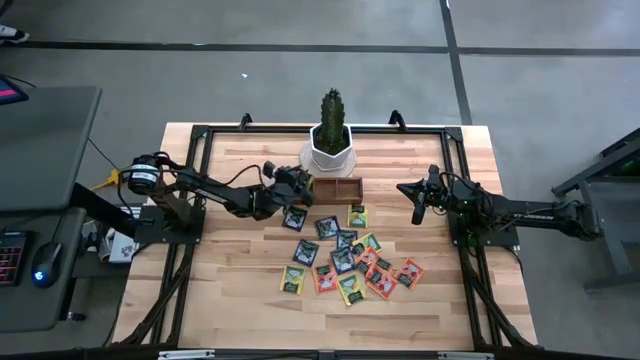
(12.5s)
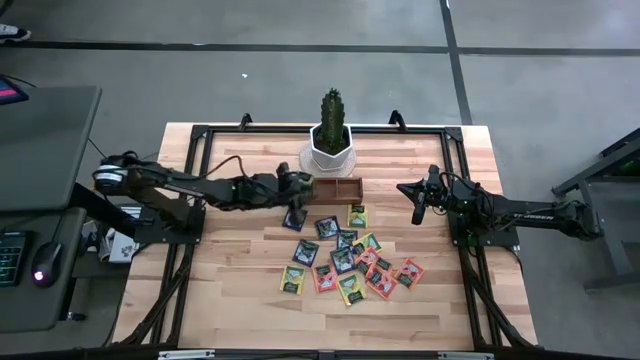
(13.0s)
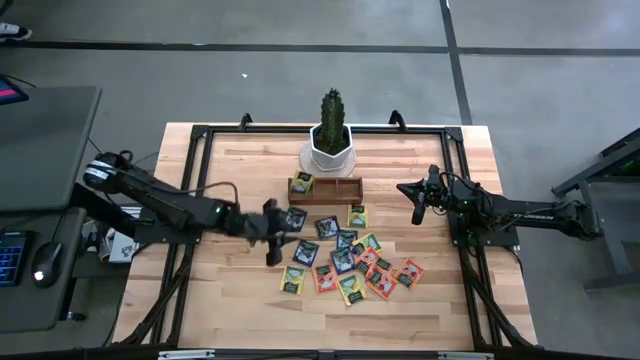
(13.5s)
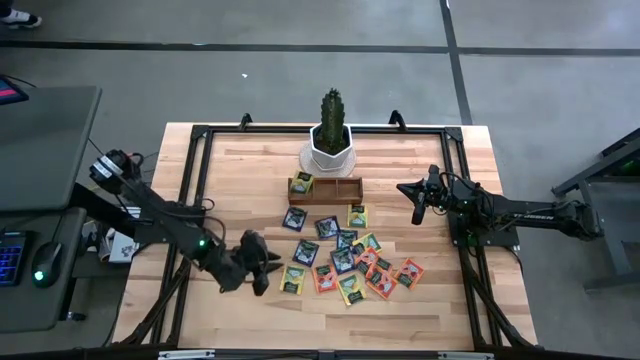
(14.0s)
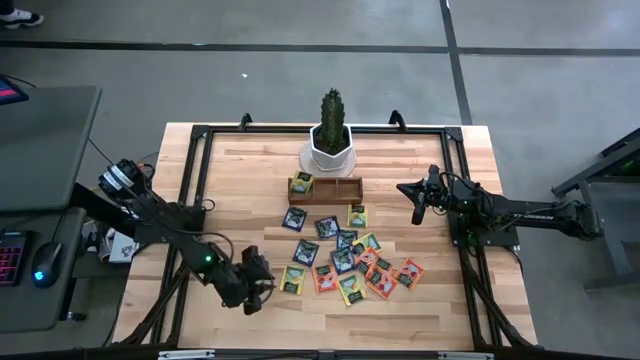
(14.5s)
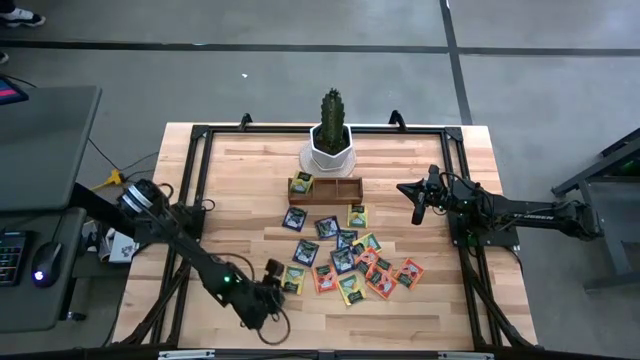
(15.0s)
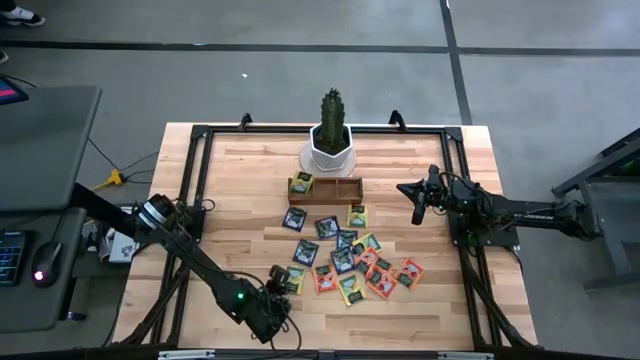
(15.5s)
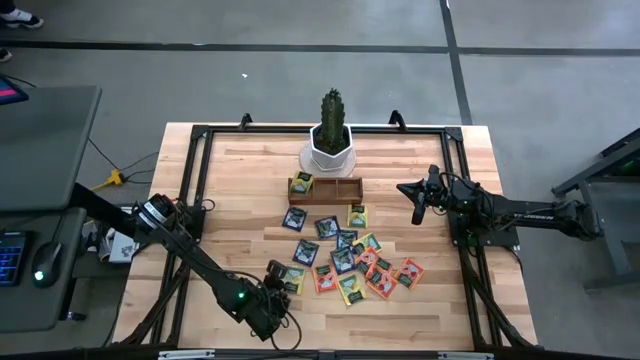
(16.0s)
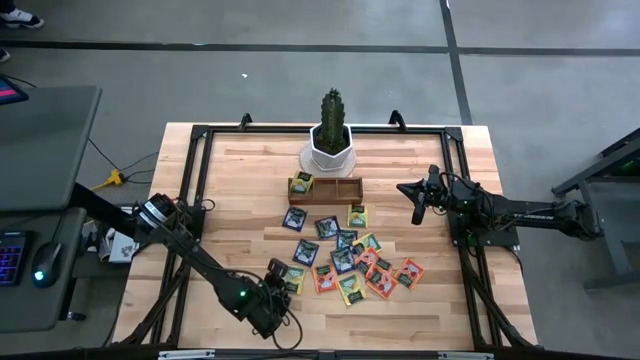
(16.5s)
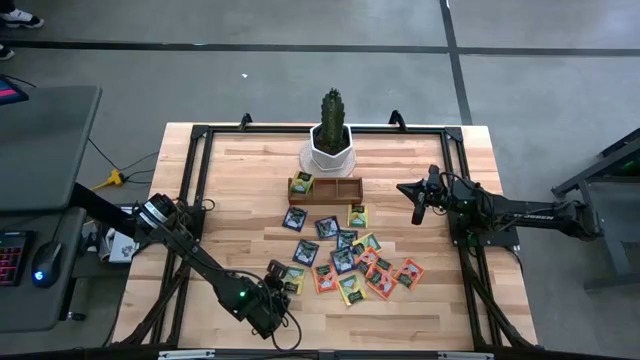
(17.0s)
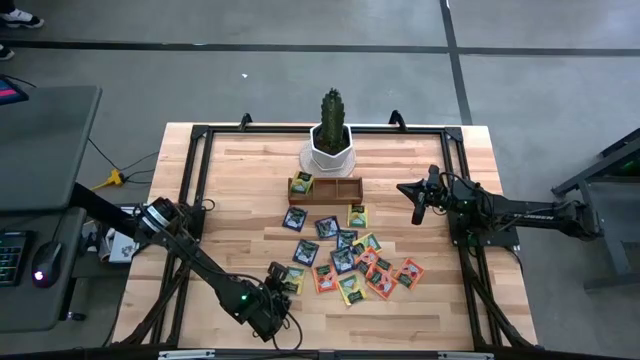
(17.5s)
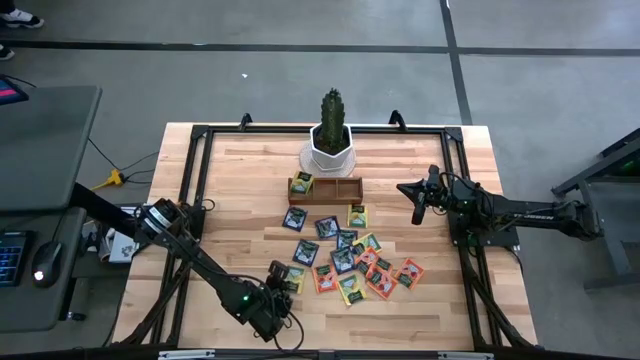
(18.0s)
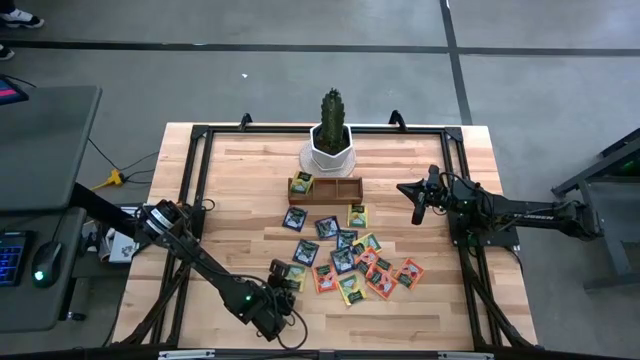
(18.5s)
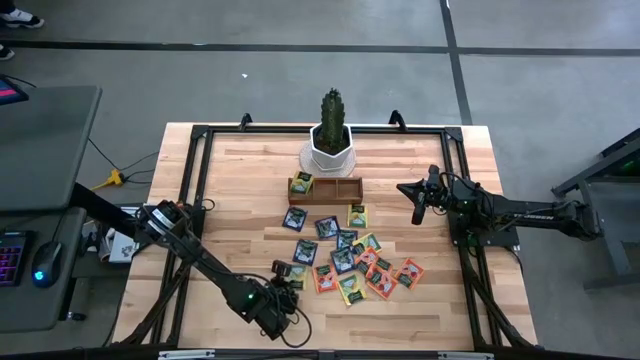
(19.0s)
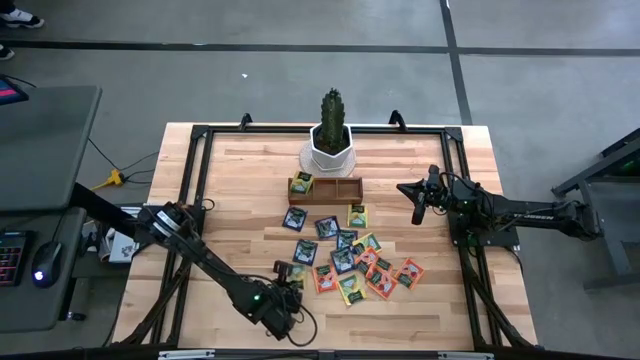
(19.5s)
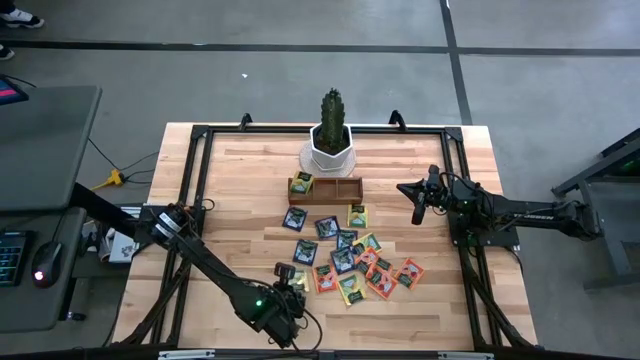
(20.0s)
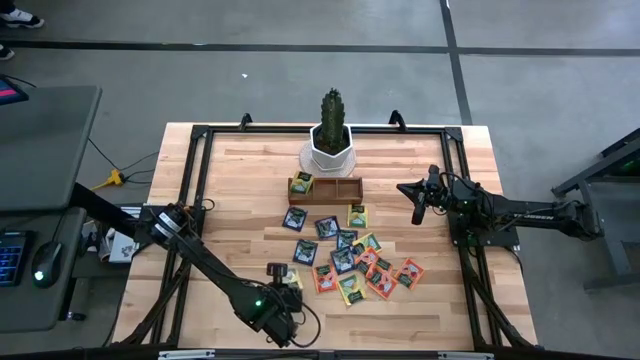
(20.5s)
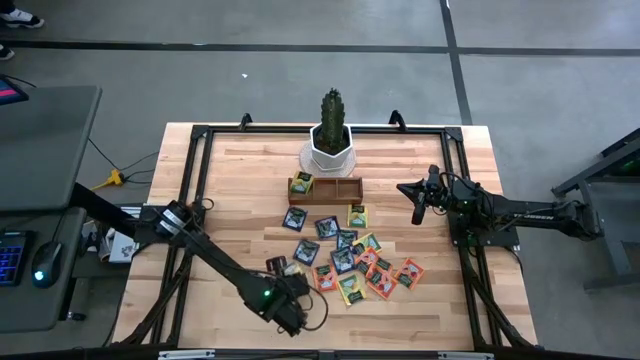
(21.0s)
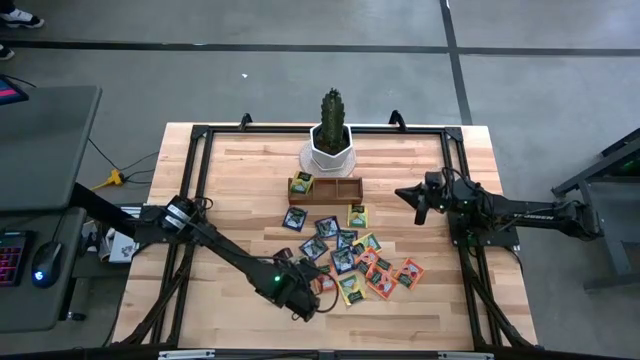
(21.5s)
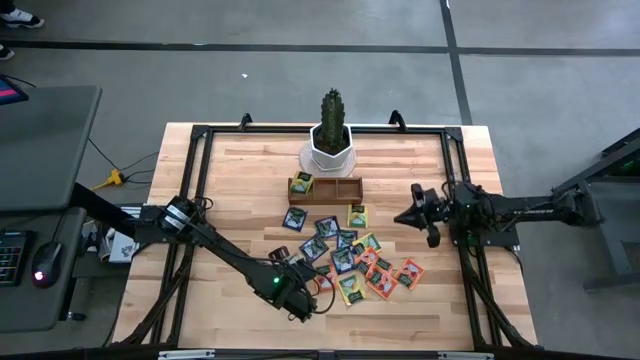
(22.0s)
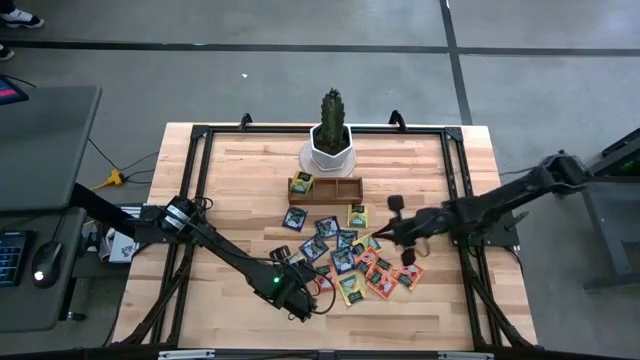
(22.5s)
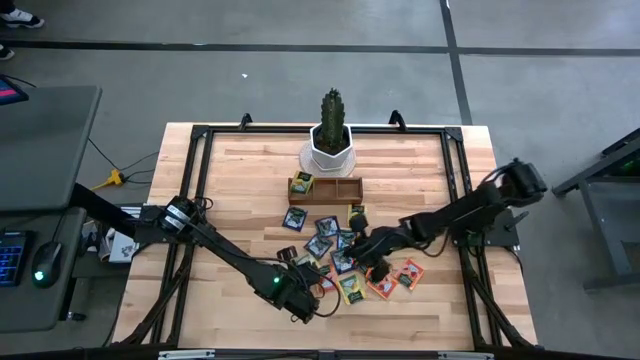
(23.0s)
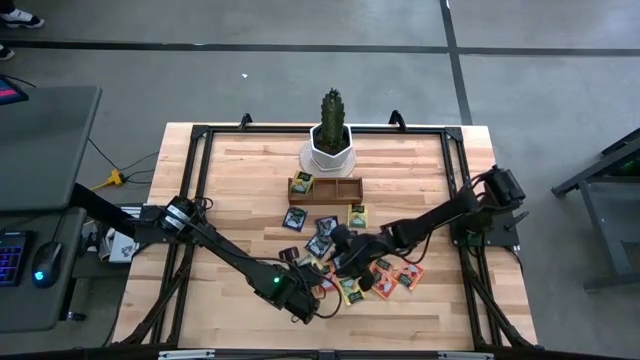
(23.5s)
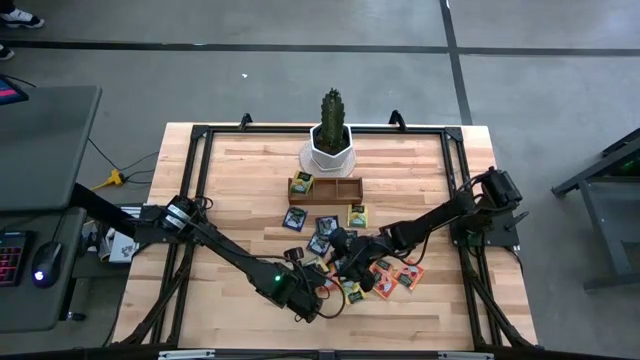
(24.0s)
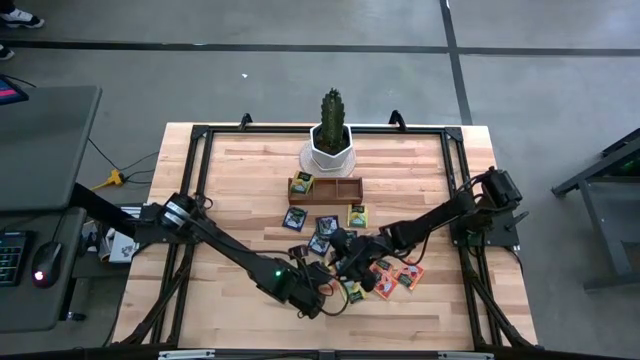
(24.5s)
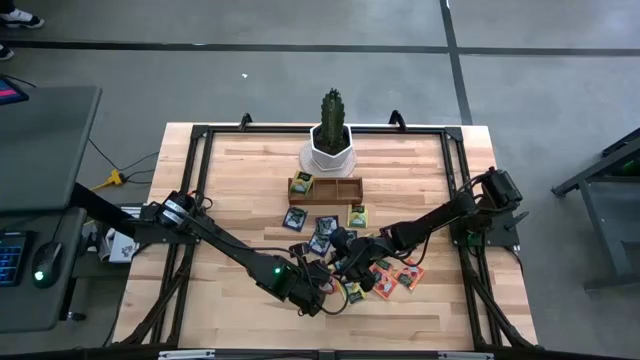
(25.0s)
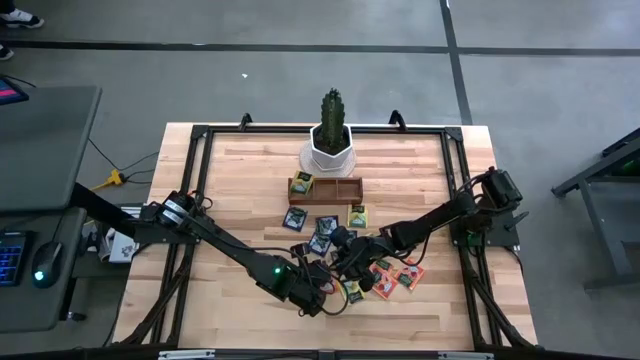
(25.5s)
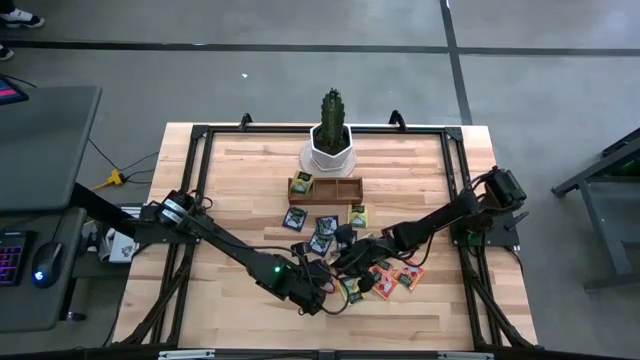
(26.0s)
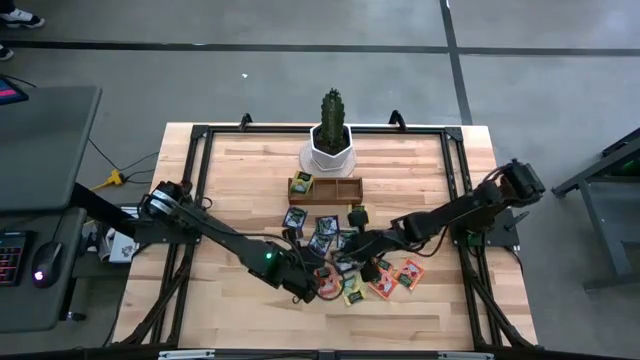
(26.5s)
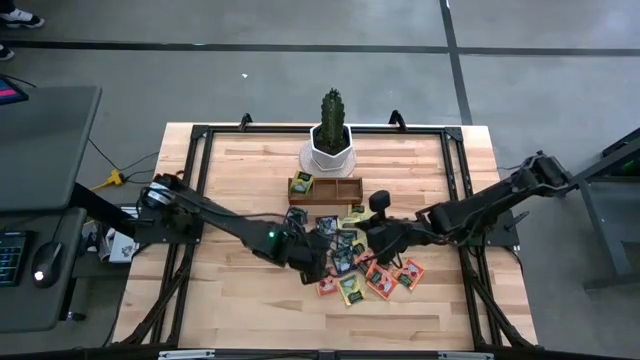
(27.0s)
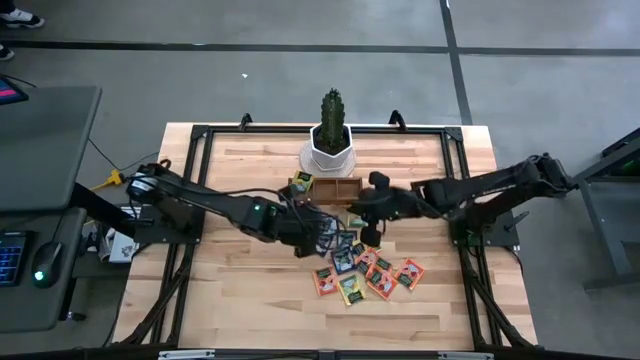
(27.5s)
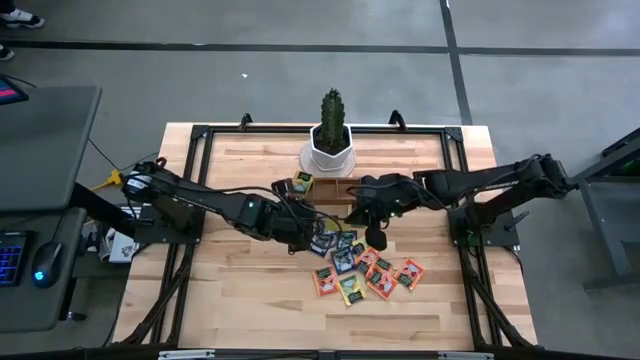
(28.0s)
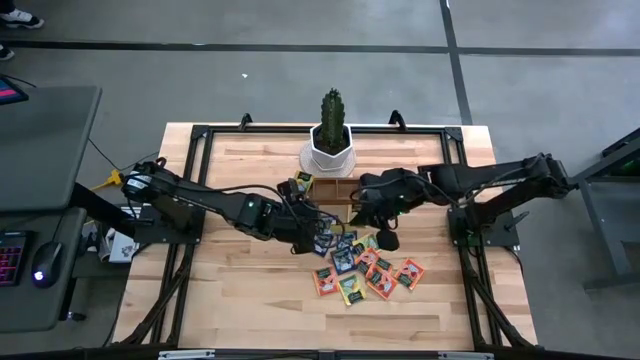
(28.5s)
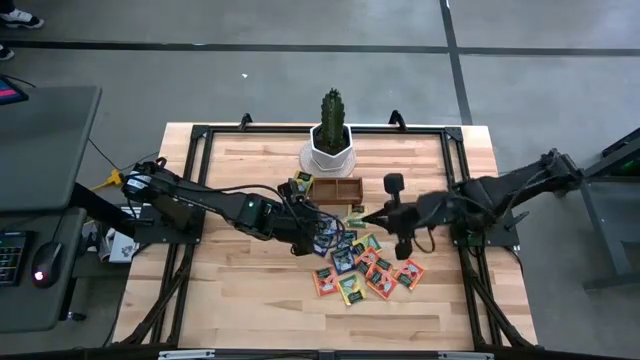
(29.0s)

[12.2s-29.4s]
Task: Pick & Place Tea
Put the yellow tea bag into the left section of the wooden organizer

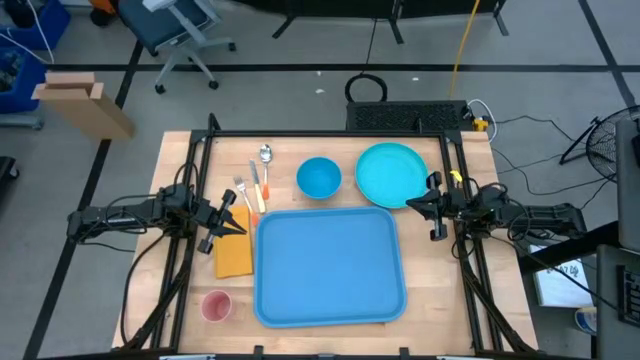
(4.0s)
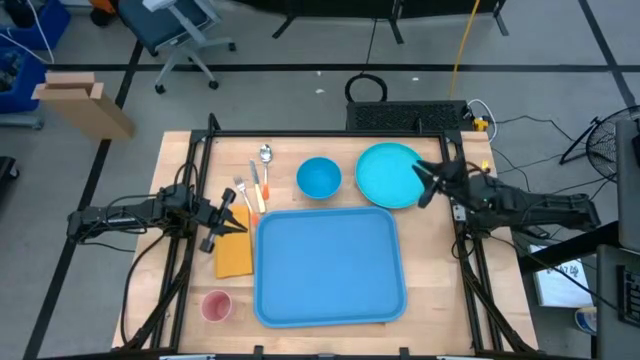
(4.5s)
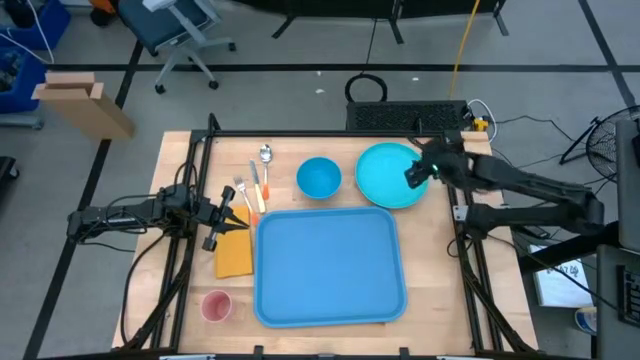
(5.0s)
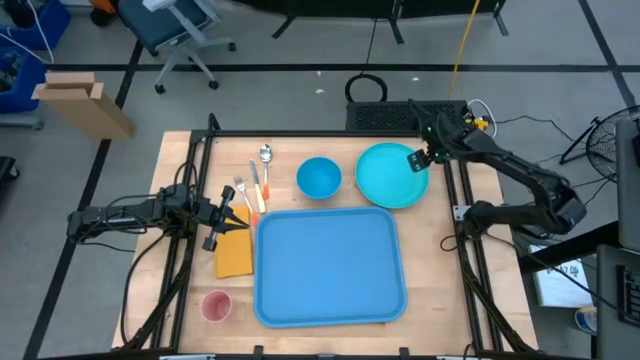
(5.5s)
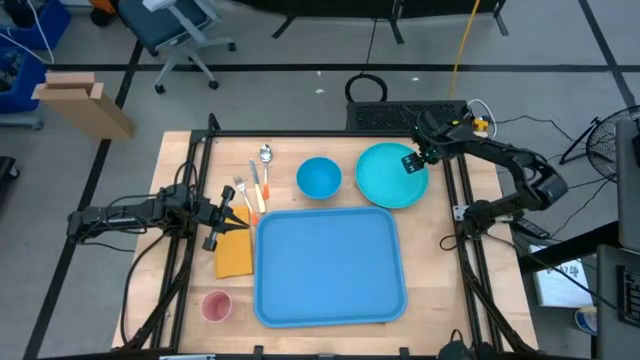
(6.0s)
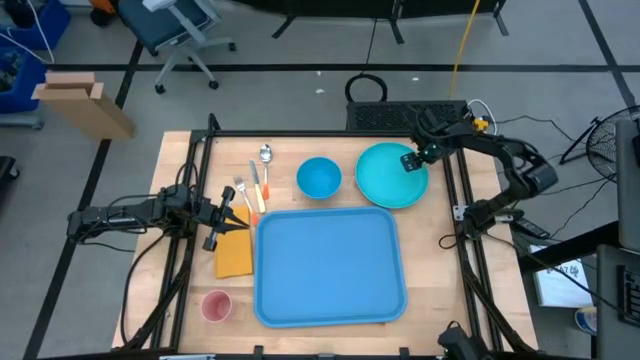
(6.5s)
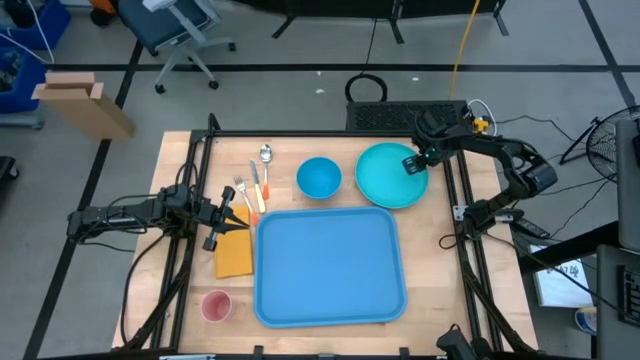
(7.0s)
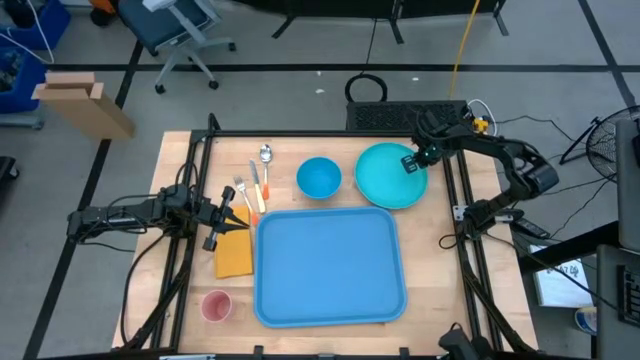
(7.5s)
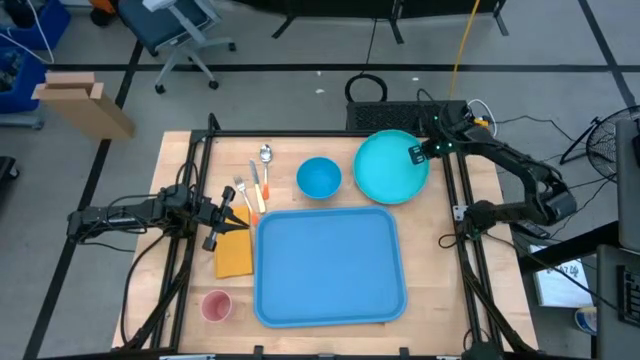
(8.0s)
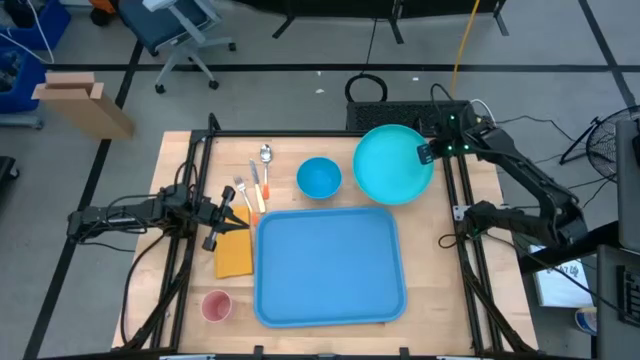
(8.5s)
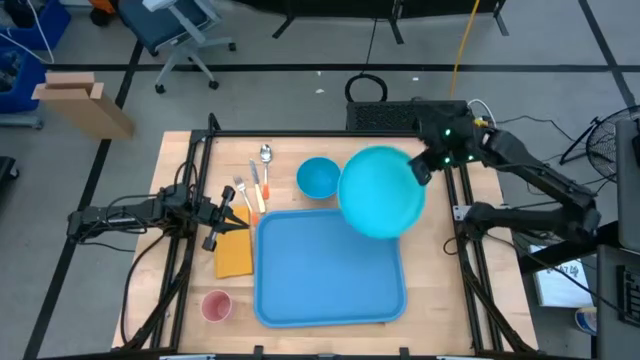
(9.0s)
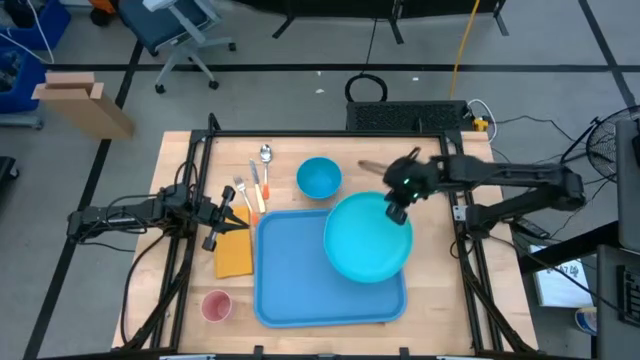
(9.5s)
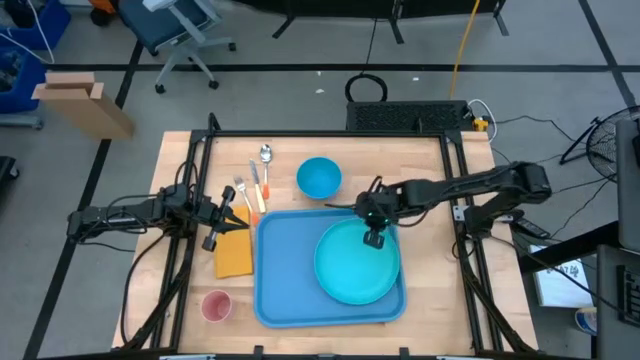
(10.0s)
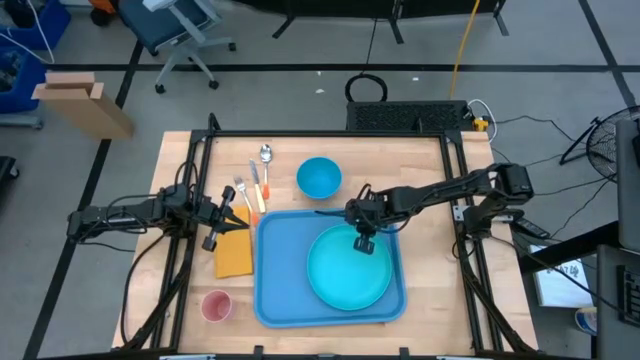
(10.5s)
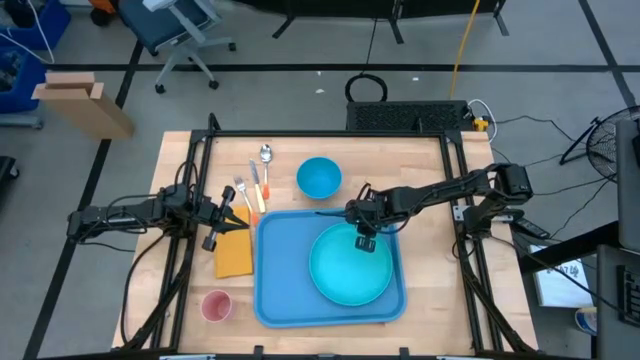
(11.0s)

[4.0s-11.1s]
Task: Set up tray
Put the light green plate on the blue serving tray
